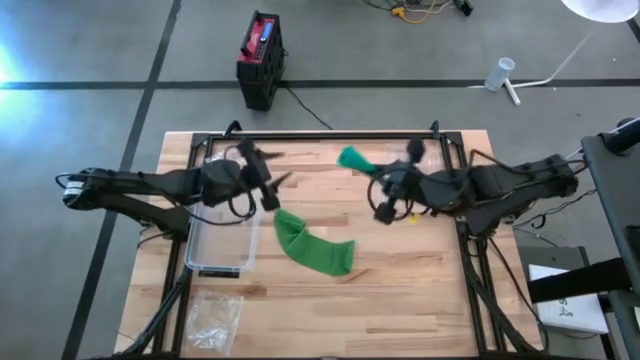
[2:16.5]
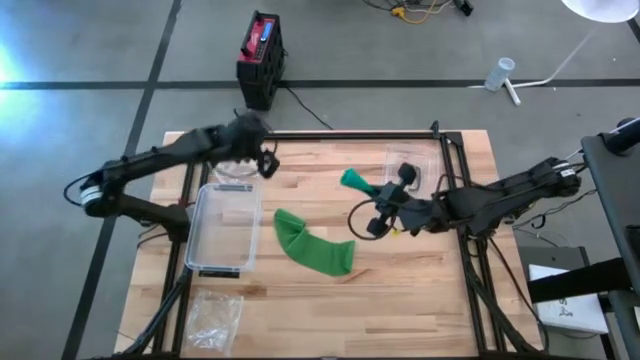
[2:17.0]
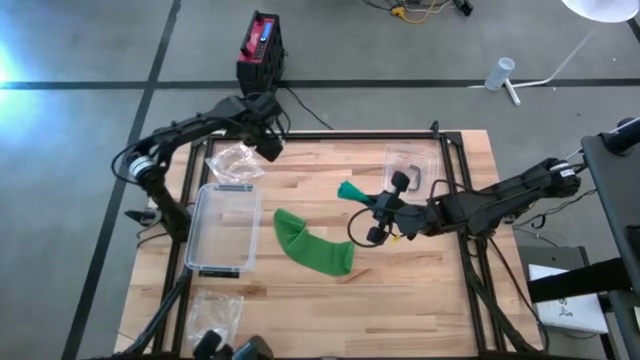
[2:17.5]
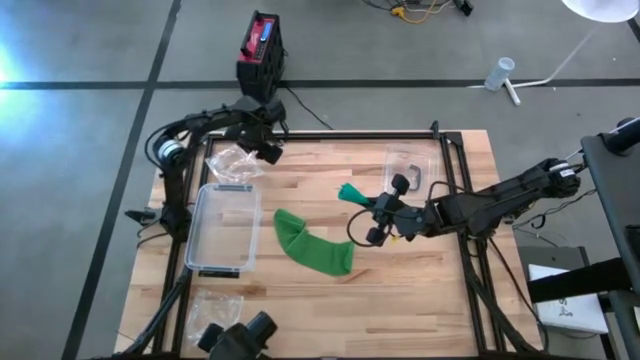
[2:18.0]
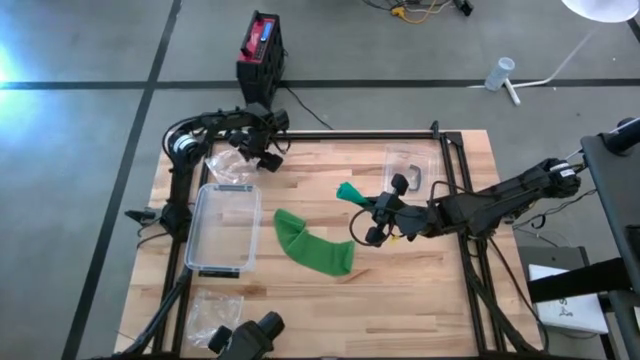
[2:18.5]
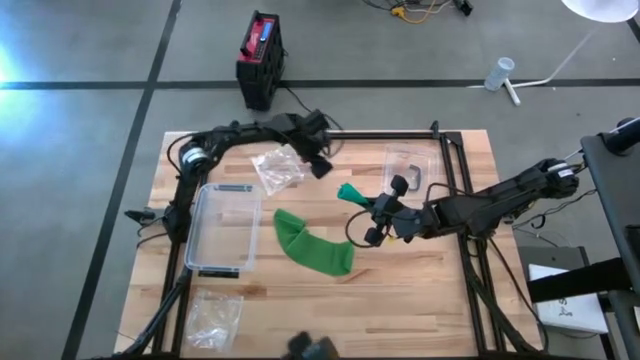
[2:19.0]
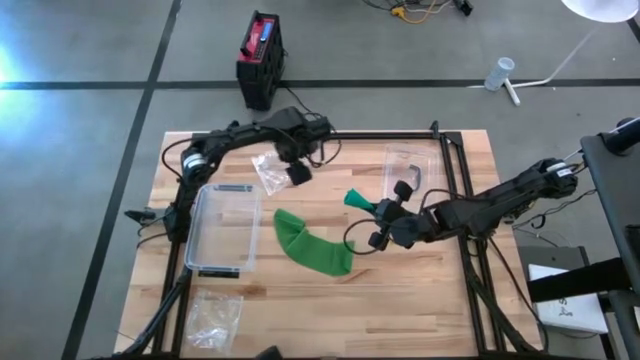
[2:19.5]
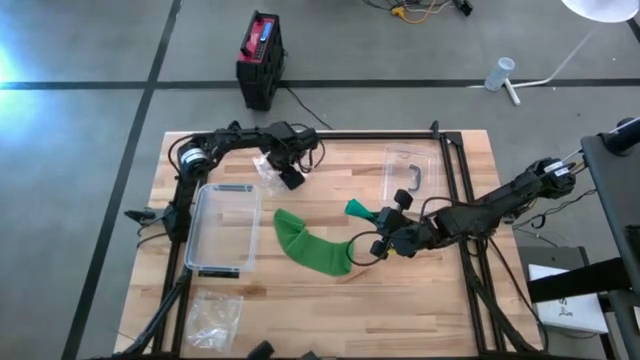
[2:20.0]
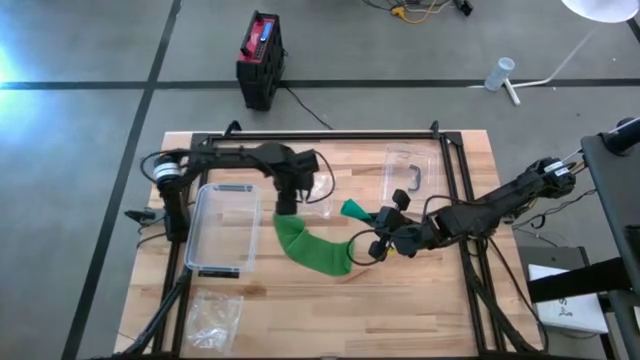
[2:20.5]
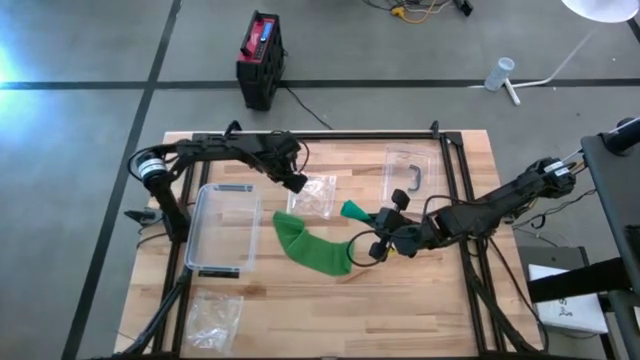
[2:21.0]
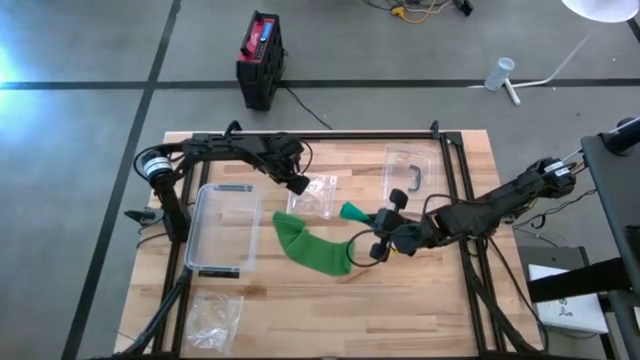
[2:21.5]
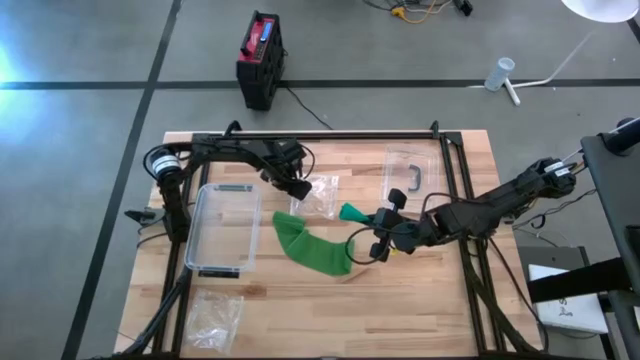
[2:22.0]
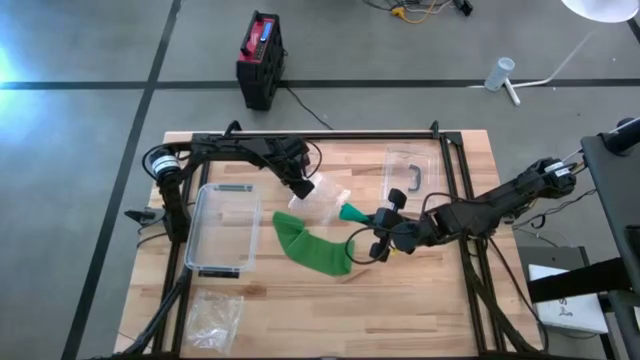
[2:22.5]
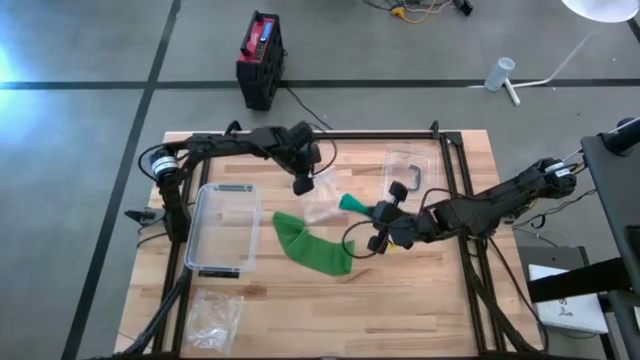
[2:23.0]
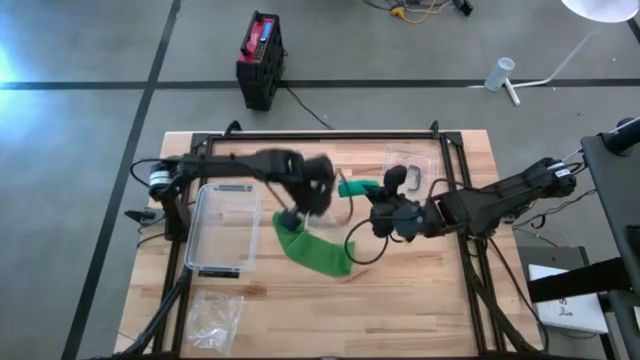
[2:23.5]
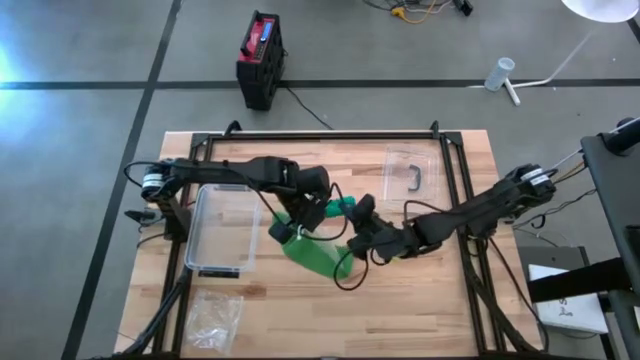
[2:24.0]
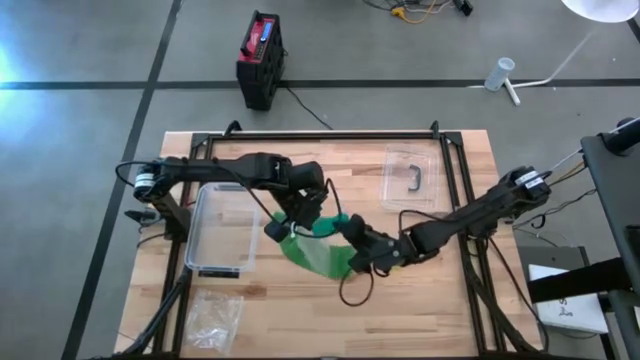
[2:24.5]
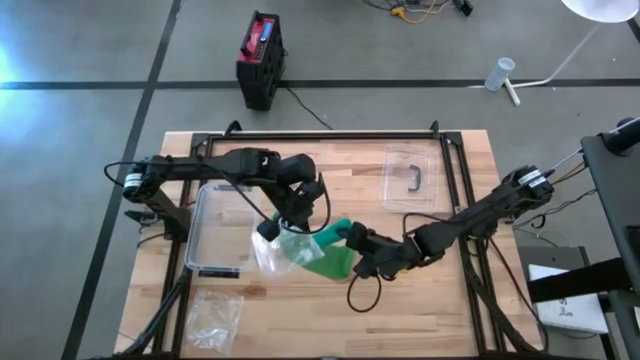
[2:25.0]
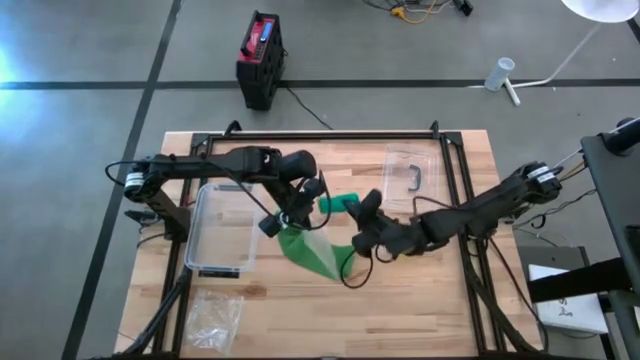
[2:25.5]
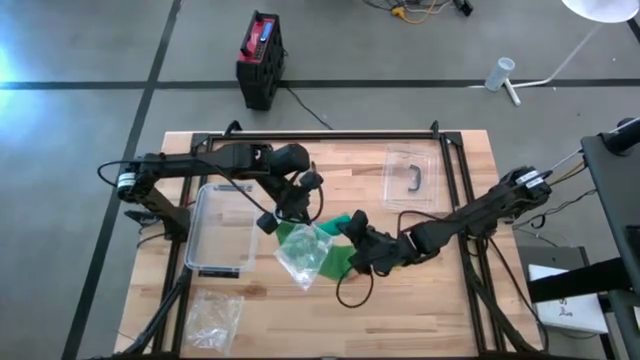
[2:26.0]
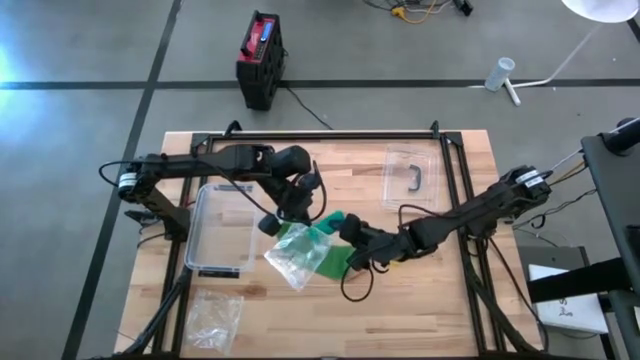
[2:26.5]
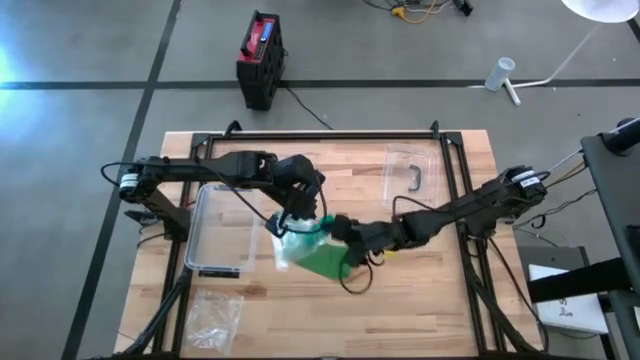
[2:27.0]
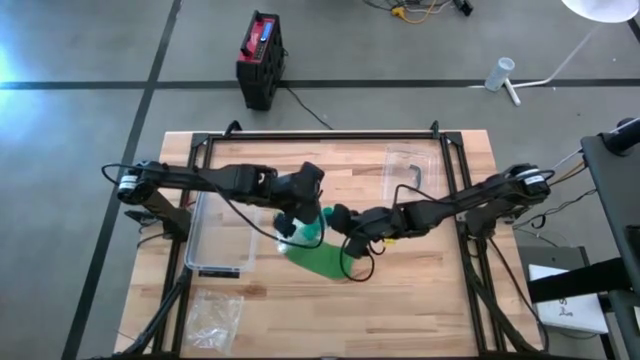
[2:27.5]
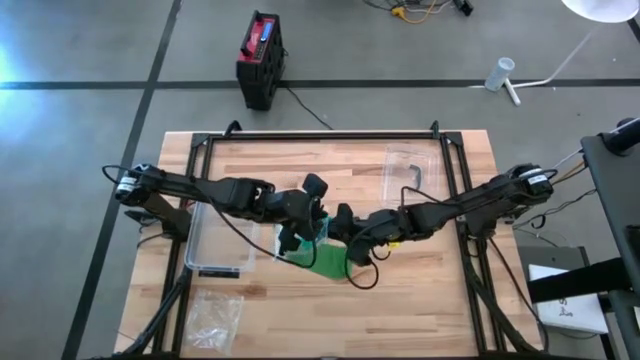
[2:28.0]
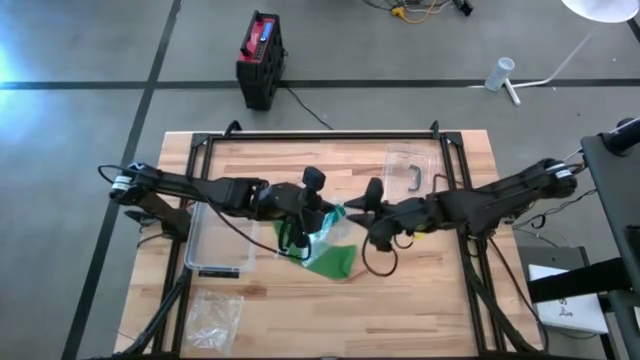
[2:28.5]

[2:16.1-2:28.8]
Task: Roll bandage
Put the rolled light green bandage into the top transparent zip bag

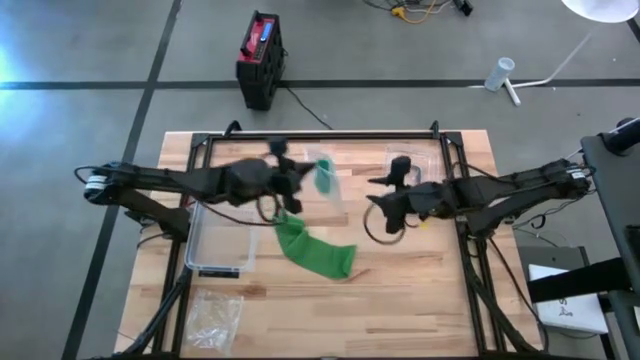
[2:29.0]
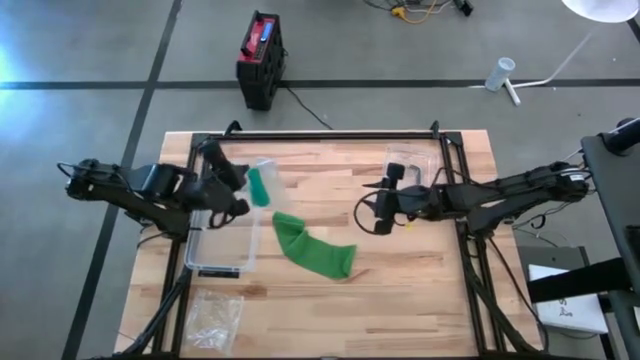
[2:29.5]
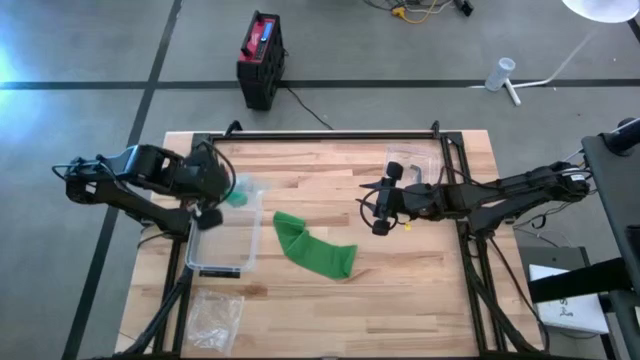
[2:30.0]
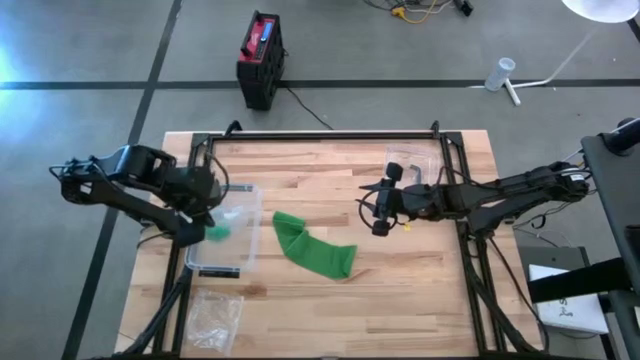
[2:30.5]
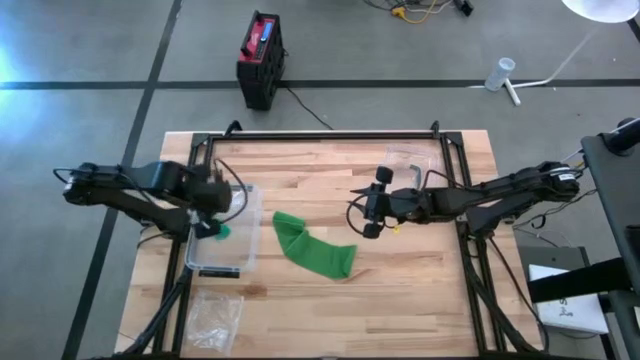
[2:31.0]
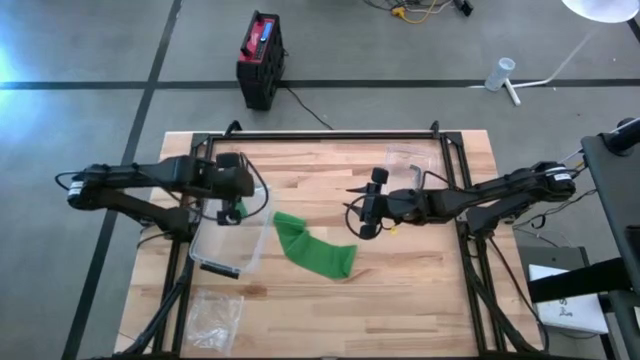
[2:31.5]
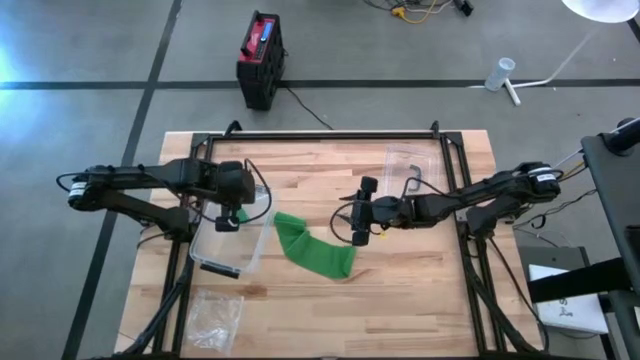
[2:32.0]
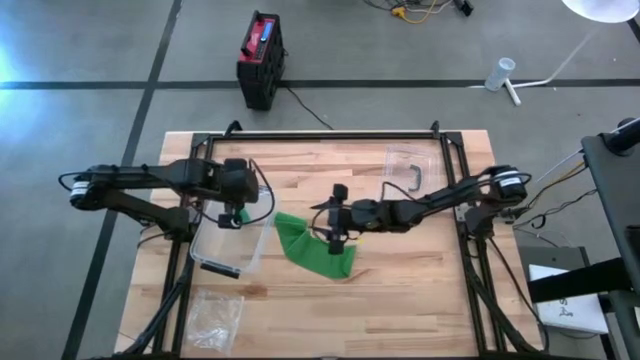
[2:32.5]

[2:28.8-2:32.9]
Put the top zip bag with the rolled light green bandage into the transparent bin

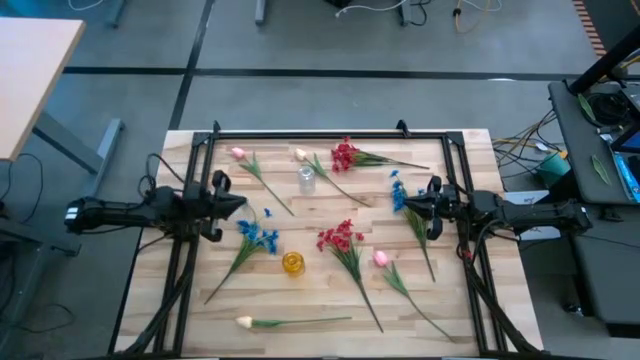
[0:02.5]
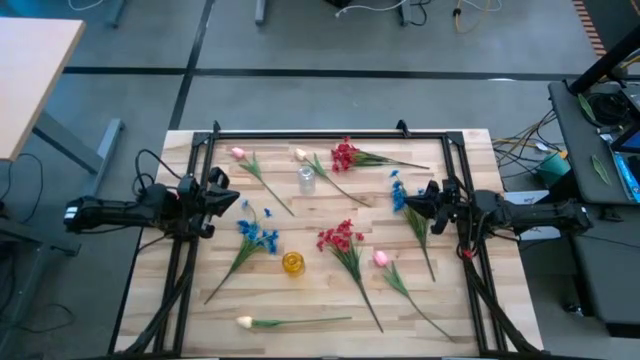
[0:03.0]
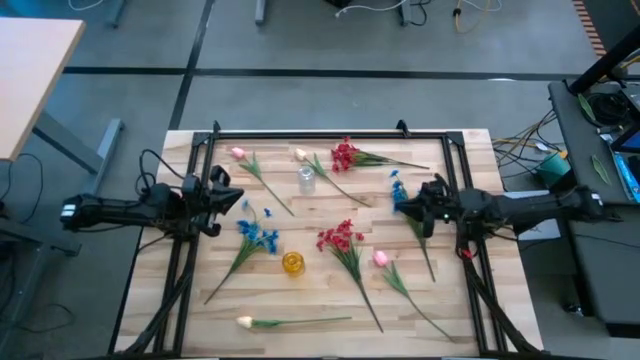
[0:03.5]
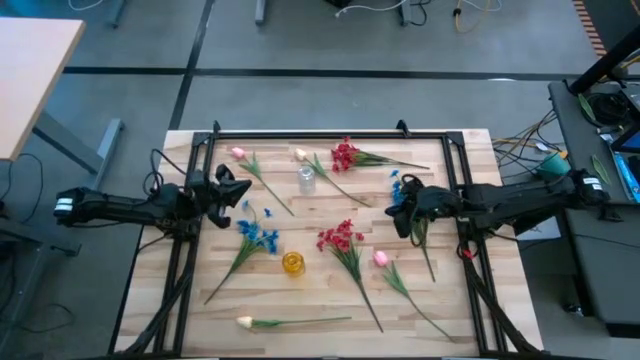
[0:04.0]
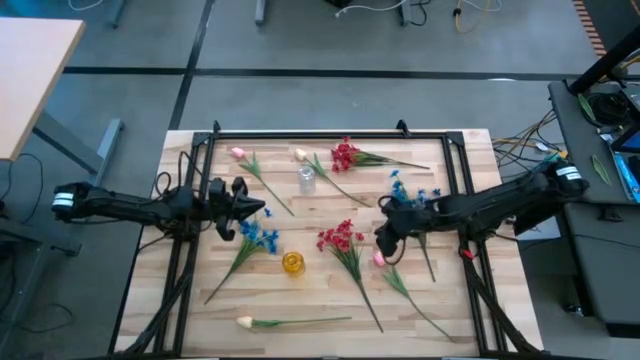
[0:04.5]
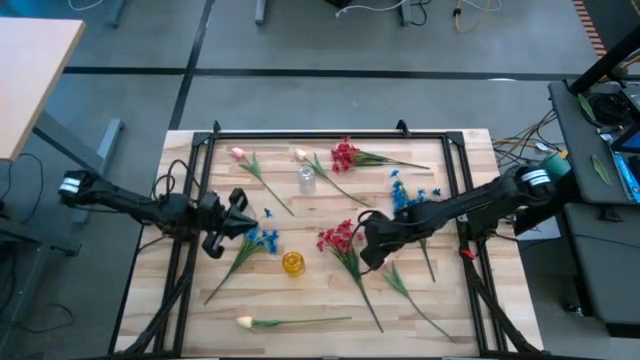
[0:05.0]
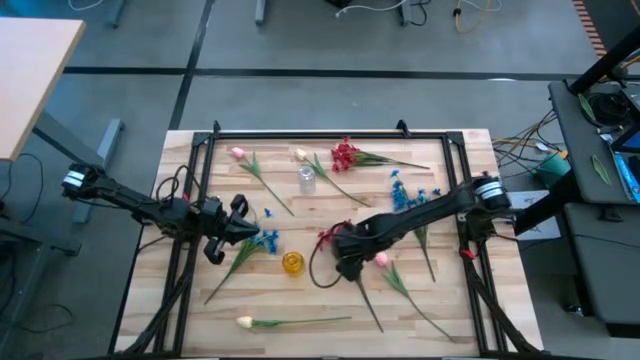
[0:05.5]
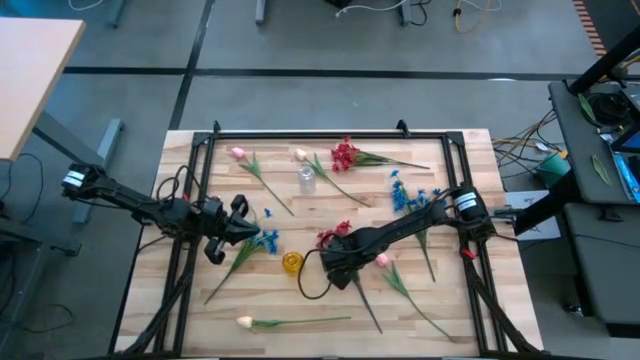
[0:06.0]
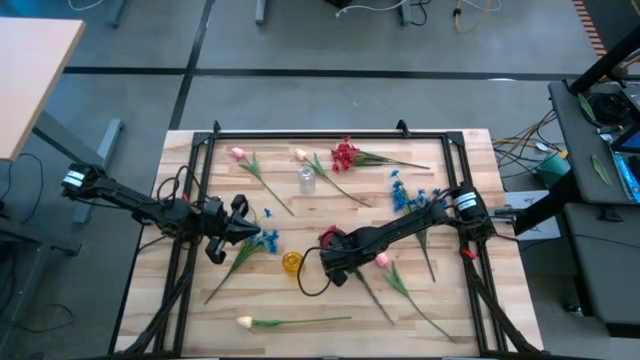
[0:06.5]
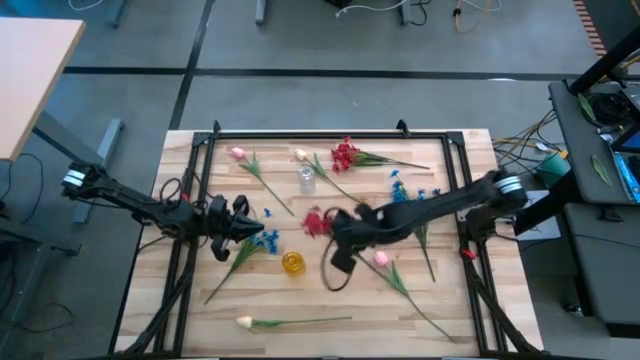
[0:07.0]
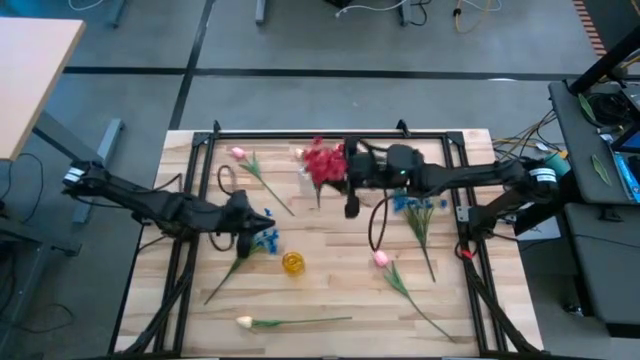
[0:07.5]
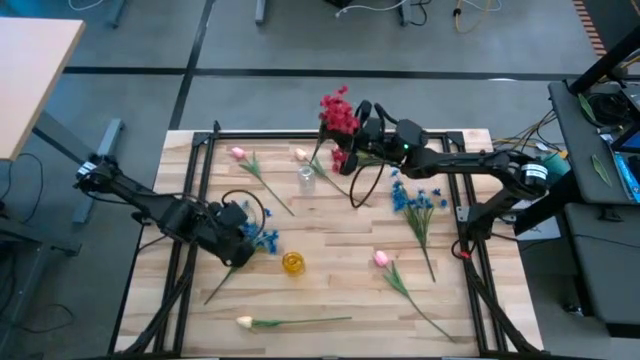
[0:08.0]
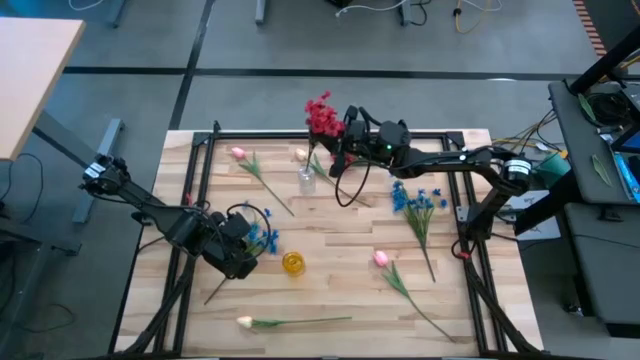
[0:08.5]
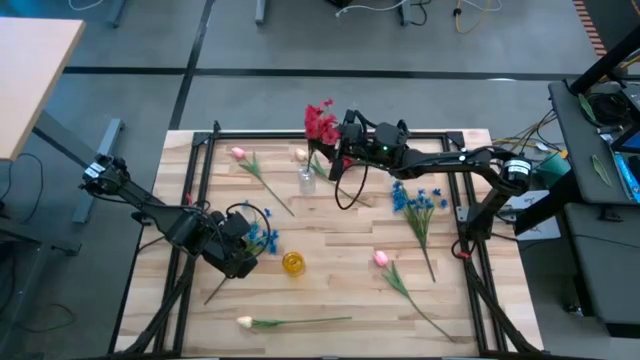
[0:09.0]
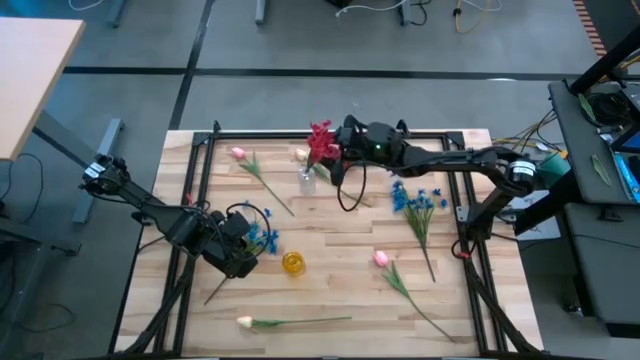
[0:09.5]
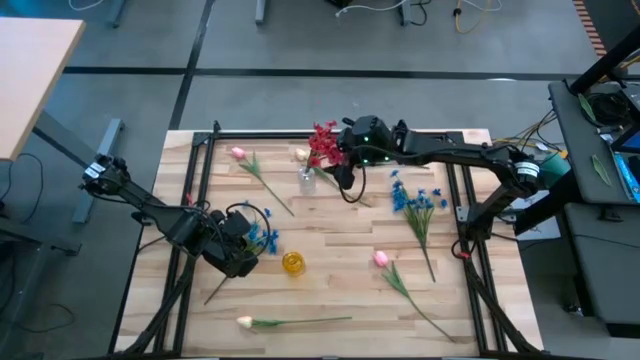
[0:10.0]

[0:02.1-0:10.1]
Task: Sort flowers into vase by color
Put the bottom red flowers into the transparent vase
